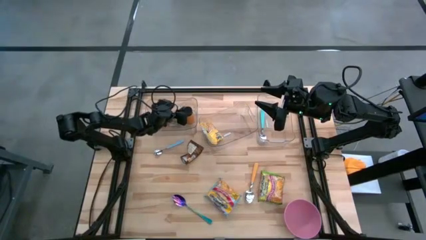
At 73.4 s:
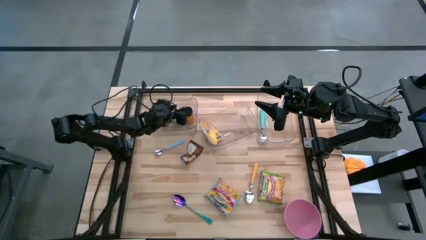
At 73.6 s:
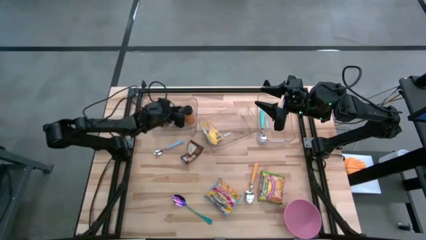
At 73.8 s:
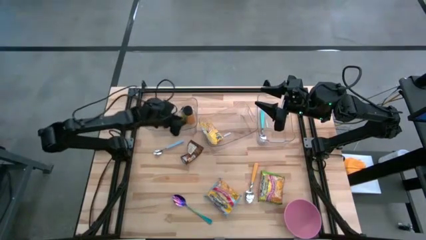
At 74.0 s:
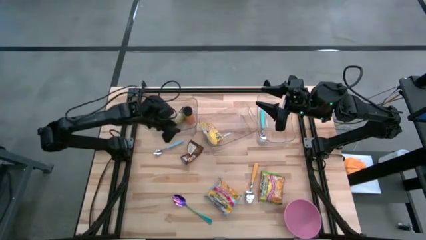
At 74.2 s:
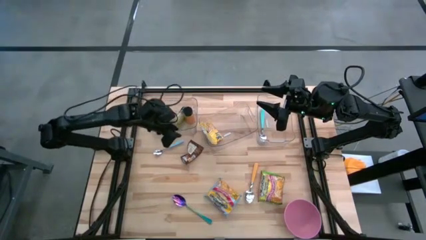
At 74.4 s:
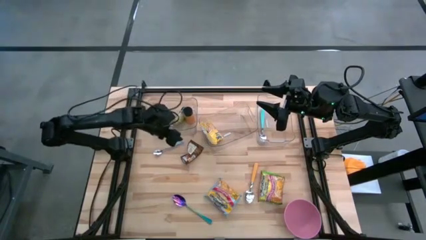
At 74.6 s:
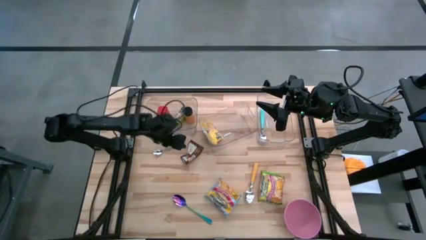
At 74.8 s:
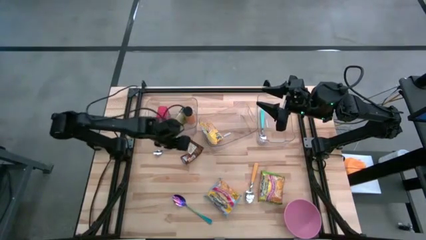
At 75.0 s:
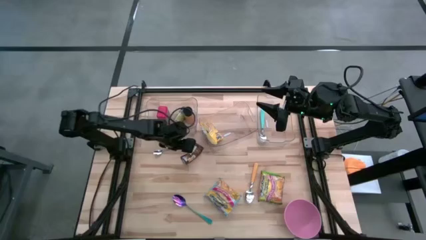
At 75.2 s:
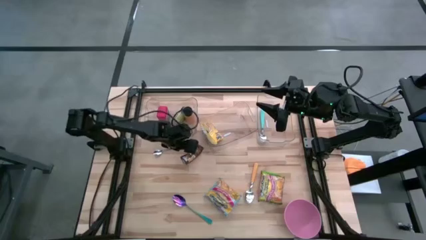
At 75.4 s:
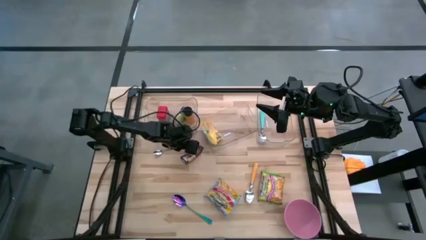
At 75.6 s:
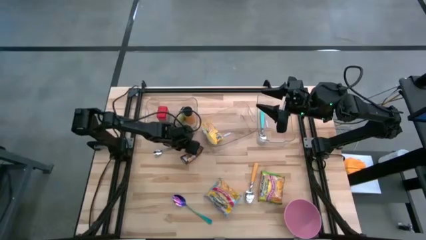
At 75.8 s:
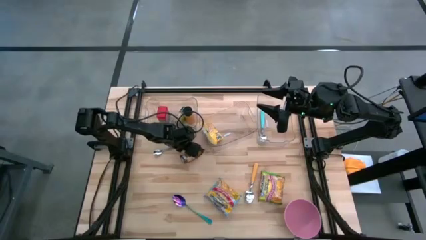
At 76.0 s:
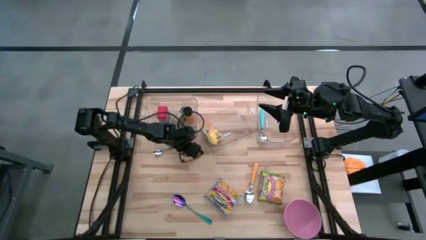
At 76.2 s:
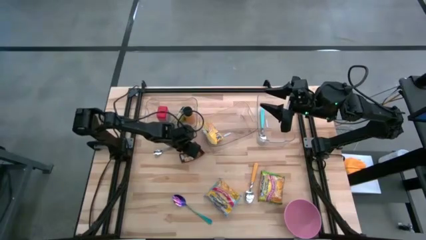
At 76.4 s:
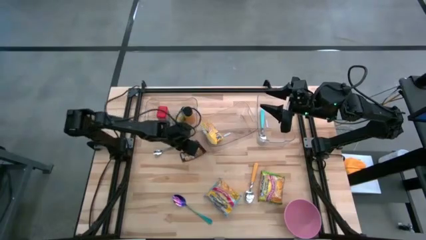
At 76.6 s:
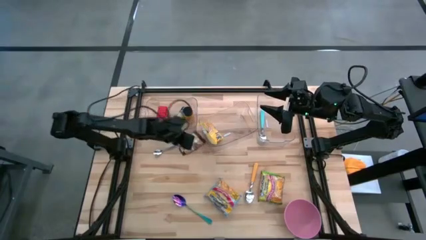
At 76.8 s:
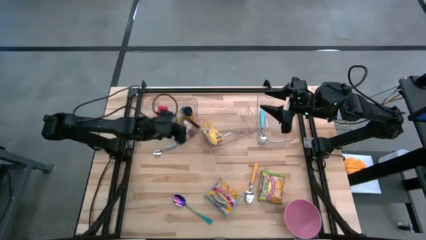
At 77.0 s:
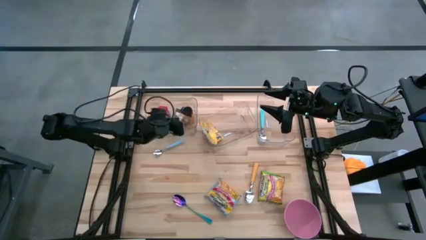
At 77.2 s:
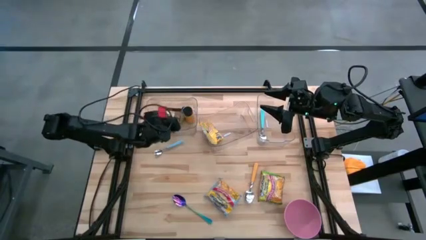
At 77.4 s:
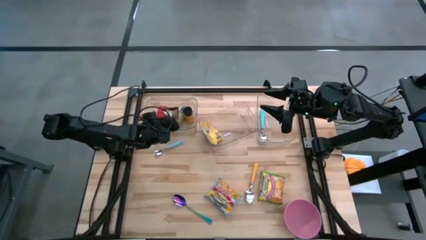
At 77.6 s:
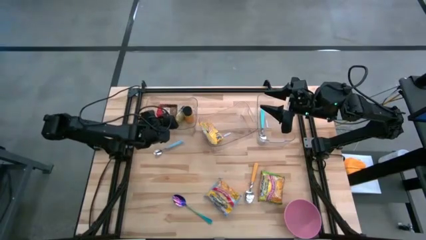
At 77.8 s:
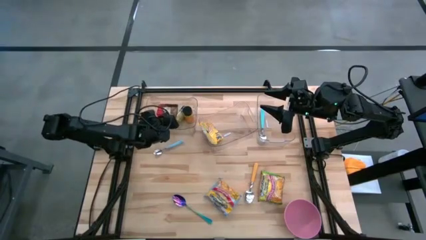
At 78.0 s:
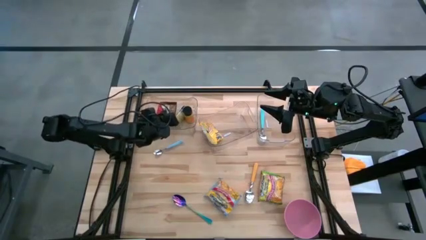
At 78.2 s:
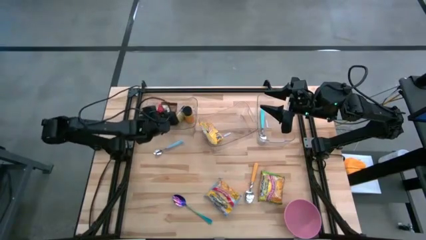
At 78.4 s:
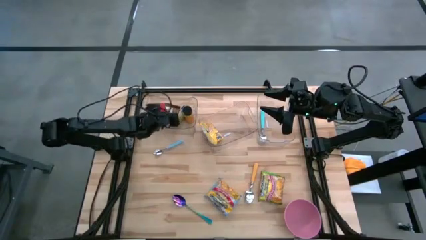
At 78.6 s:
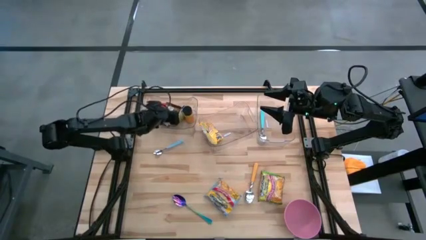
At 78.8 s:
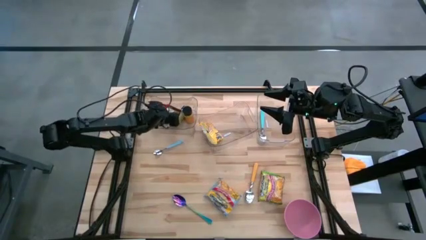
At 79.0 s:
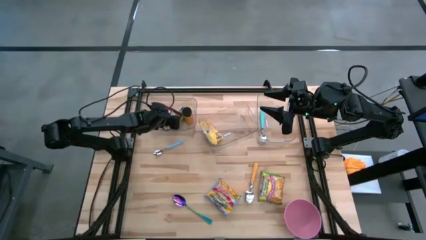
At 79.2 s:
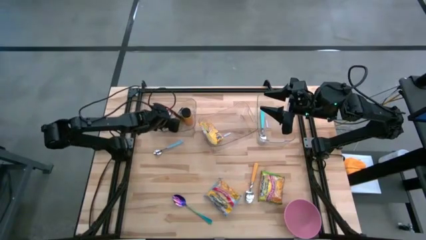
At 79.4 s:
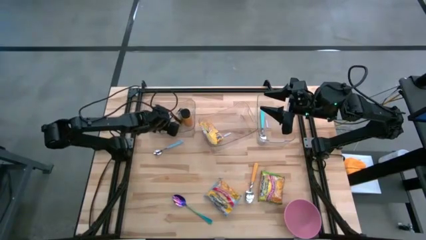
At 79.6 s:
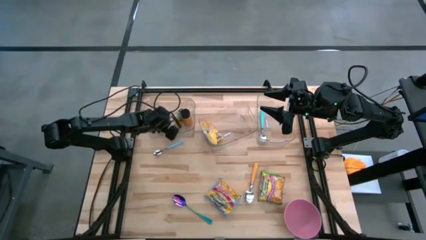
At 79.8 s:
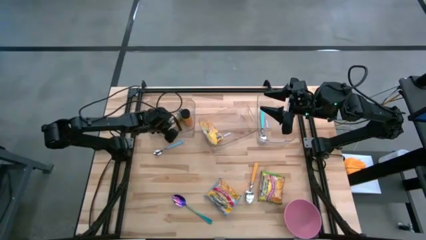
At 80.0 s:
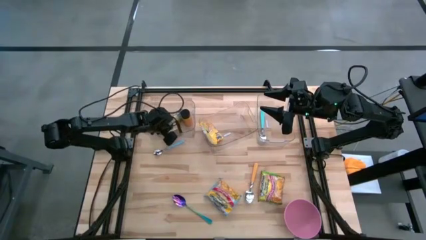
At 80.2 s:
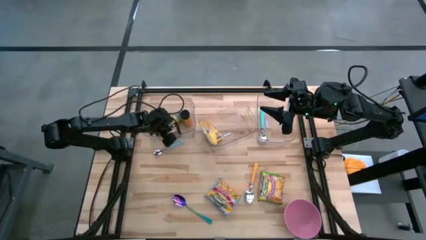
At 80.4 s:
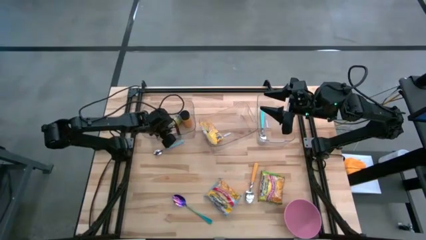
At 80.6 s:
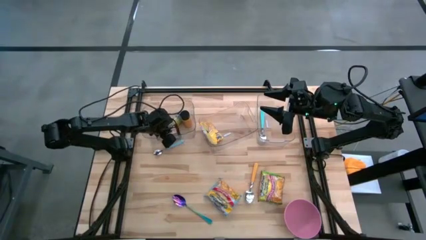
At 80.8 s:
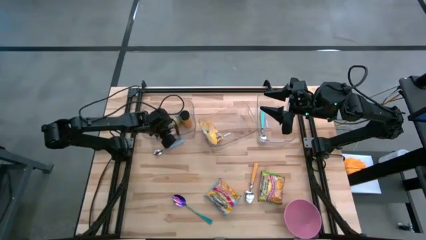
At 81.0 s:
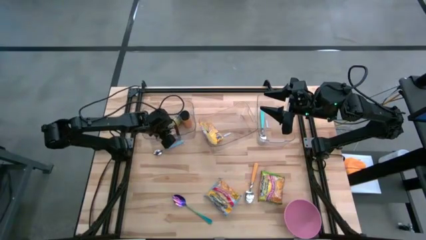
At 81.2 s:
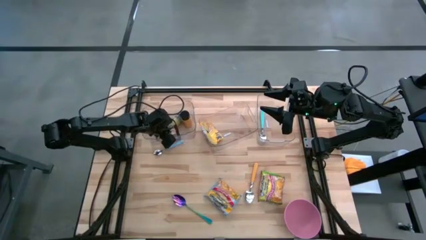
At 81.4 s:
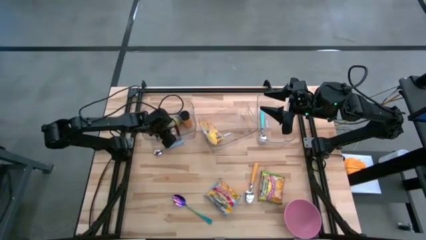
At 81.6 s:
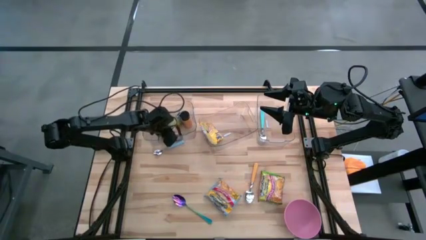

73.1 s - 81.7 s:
Task: Pick & Place Food Item
Put the orange seasoning pack into the left transparent bin

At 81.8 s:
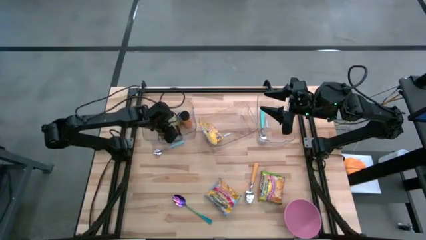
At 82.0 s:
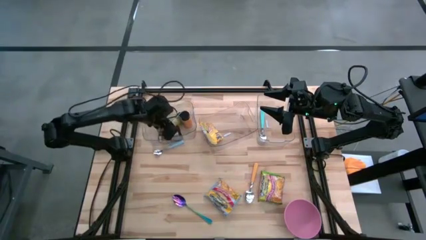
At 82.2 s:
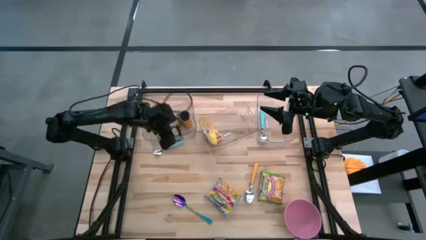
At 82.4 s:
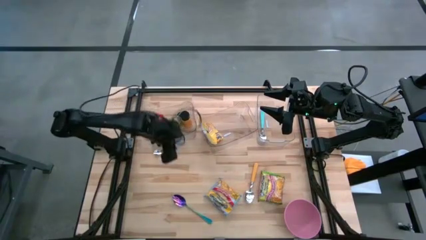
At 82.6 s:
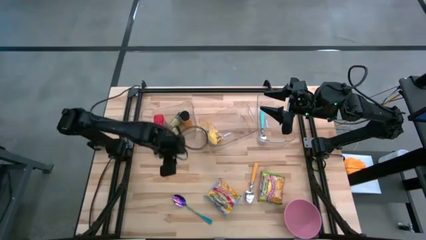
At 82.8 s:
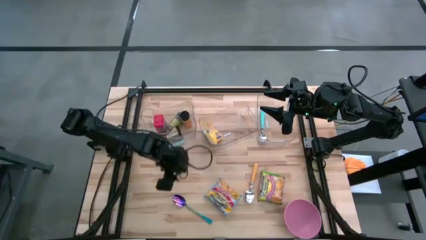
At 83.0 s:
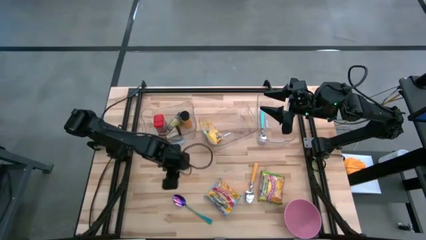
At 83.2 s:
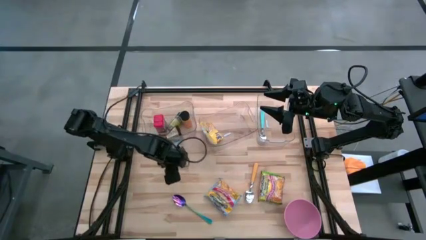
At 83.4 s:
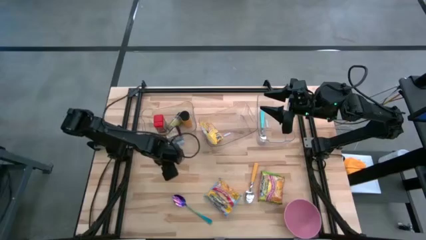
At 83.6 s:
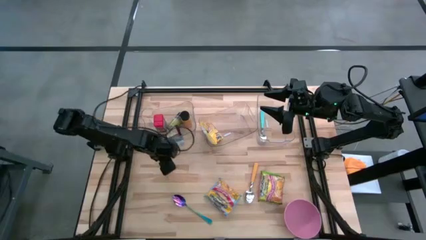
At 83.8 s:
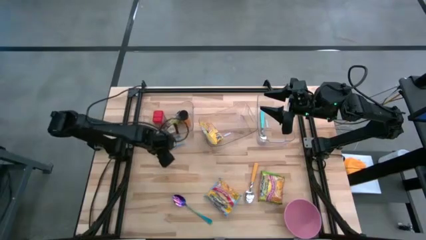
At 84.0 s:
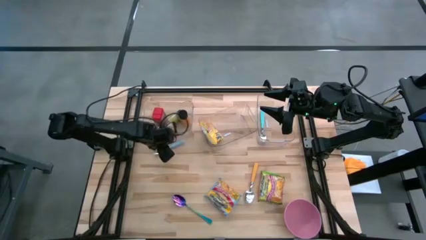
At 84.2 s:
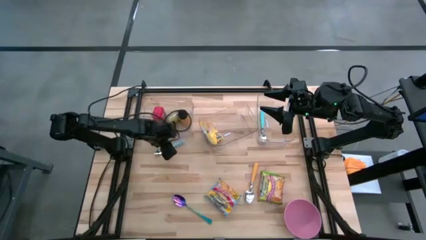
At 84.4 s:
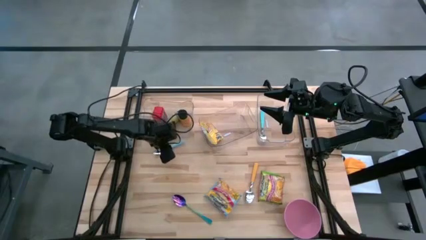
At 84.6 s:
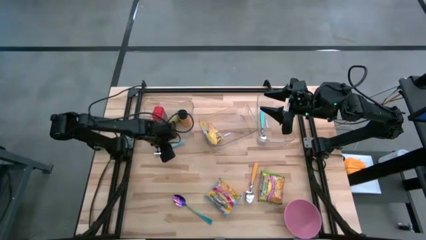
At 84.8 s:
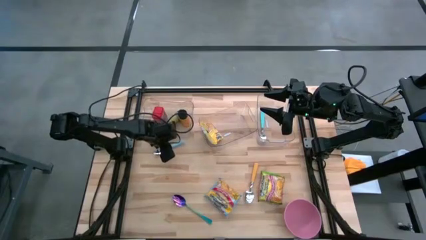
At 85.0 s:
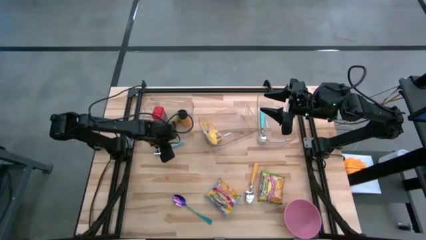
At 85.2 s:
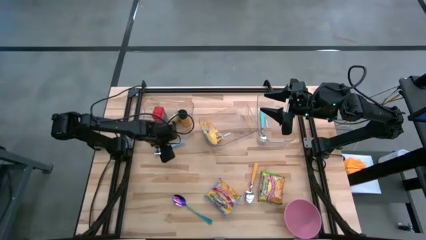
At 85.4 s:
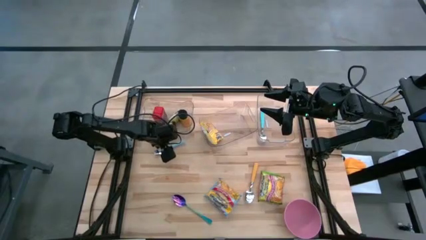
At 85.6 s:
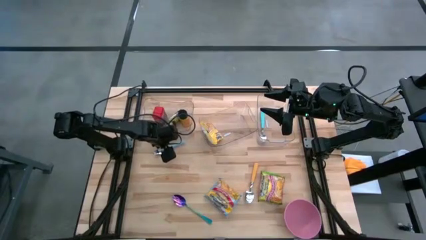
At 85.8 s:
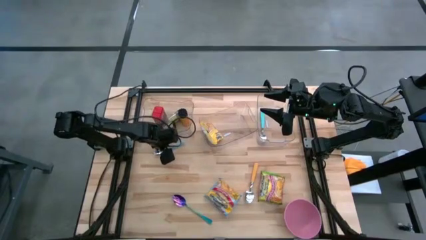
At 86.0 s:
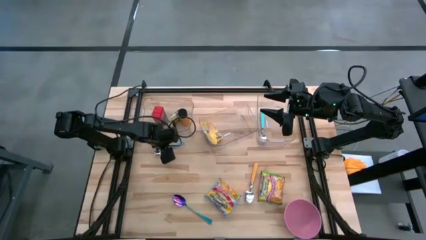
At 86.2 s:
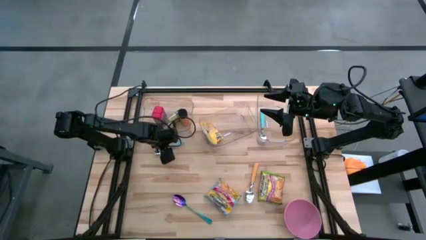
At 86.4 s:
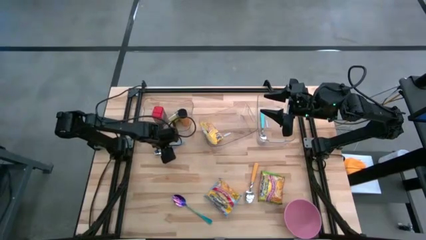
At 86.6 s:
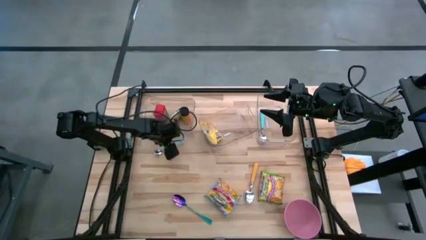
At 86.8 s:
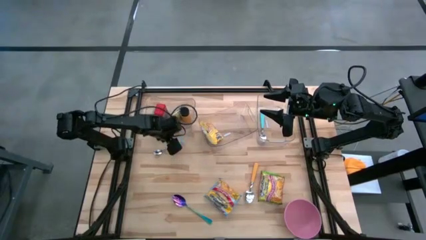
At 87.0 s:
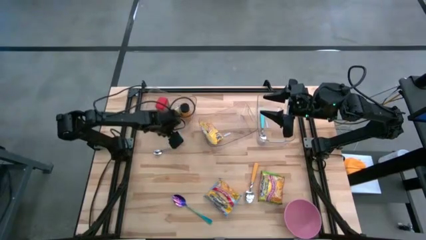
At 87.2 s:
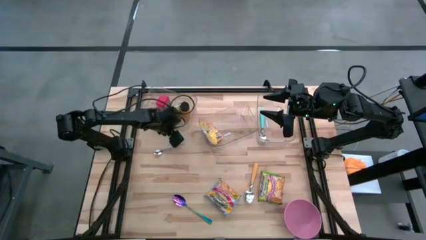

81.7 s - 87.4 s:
Adjust the left transparent bin

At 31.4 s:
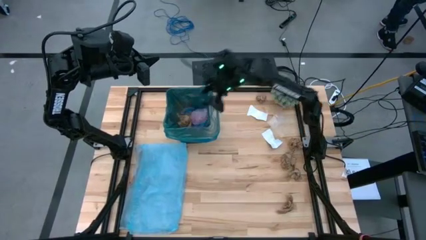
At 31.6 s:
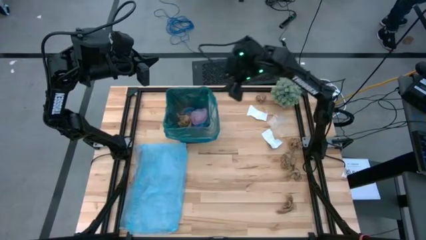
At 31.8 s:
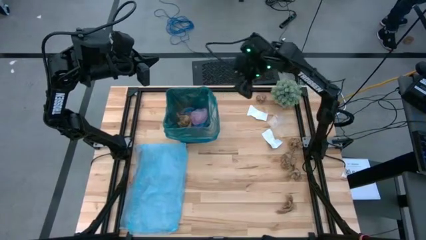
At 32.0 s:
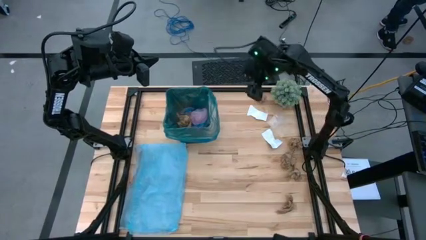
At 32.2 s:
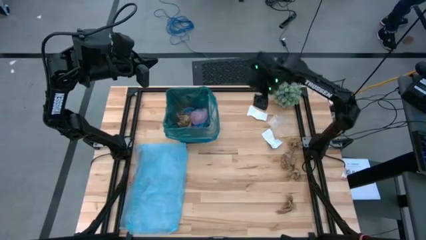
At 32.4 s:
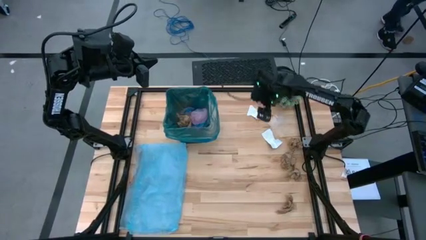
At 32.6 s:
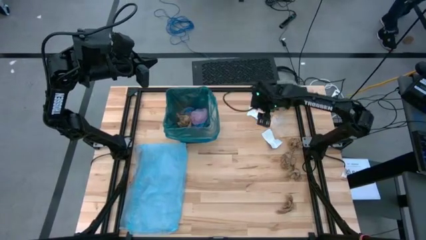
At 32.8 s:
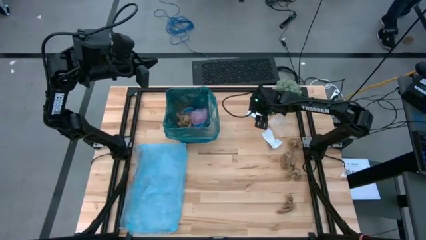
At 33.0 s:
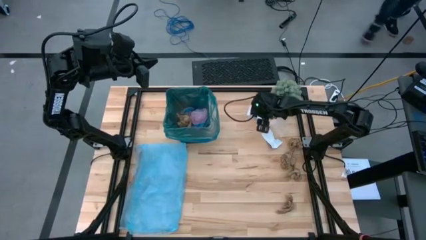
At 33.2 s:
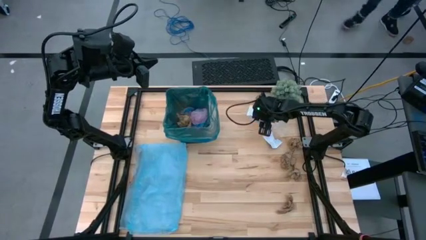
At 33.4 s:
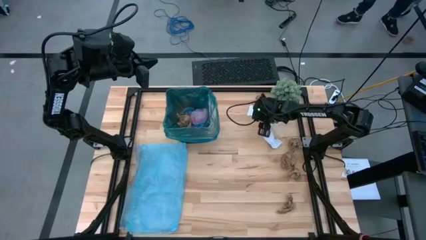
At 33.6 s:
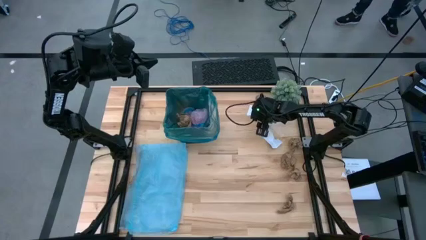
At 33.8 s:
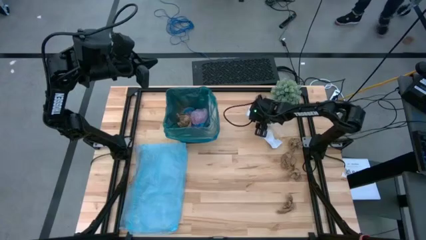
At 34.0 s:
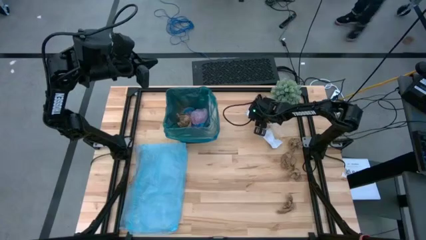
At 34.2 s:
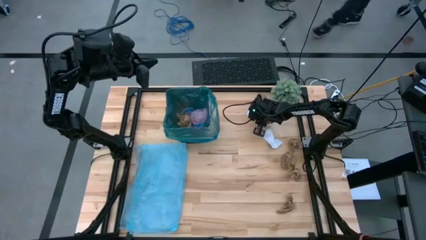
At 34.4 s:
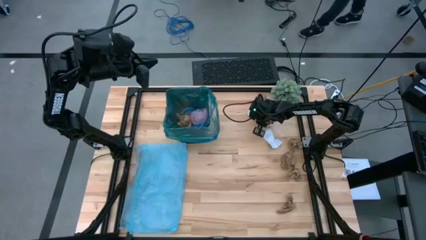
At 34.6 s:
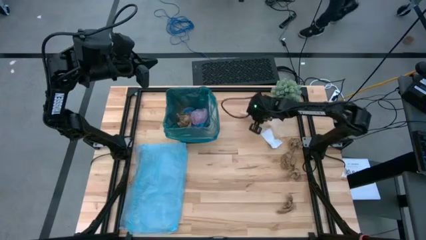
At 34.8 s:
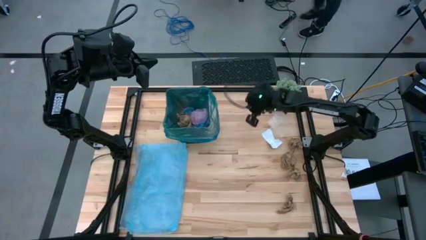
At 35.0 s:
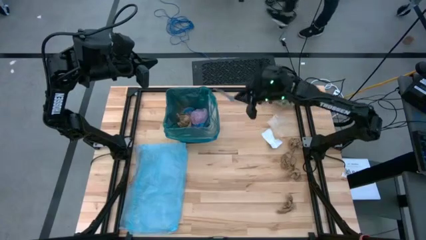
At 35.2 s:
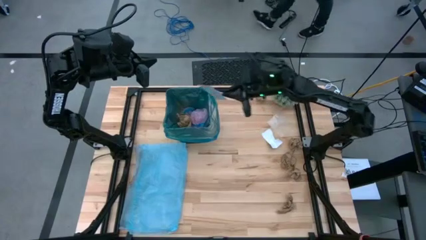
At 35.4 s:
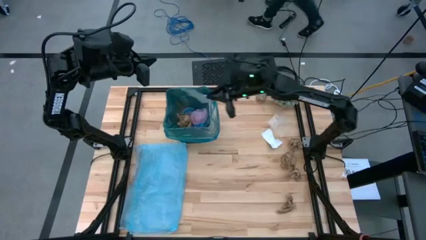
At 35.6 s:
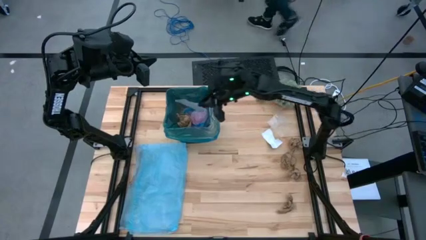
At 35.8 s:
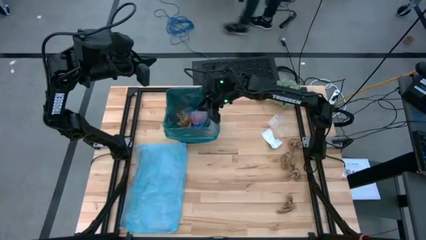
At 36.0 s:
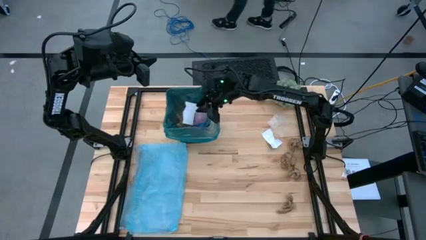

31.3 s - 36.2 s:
Task: place trash/remove bag and relplace
Put the paper into the trash bin
